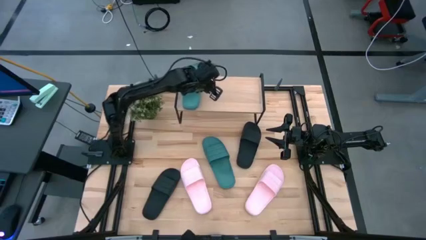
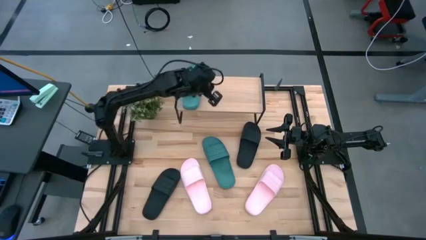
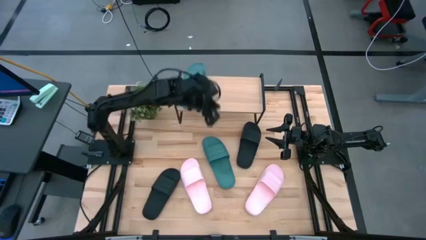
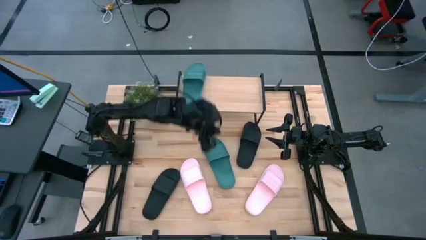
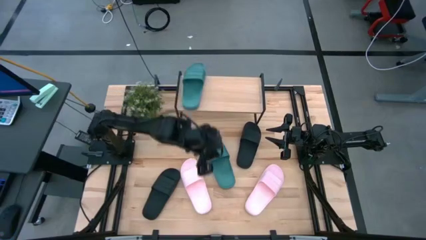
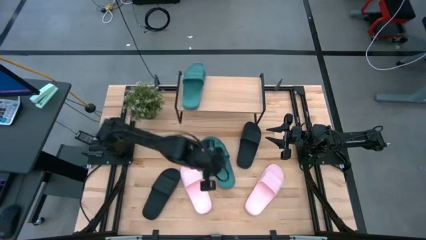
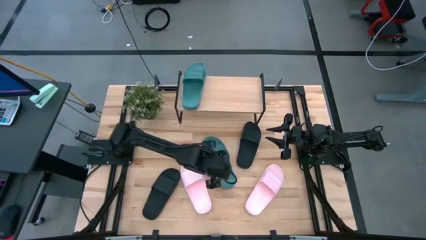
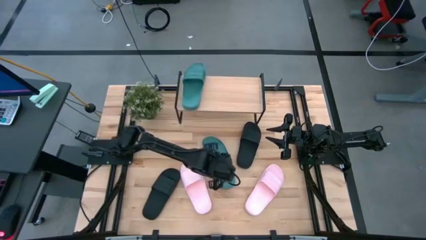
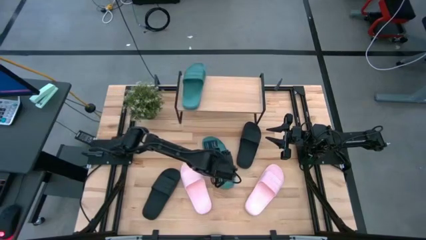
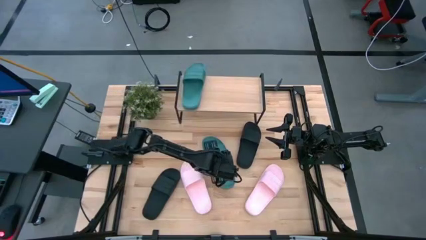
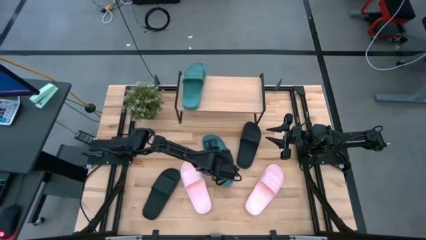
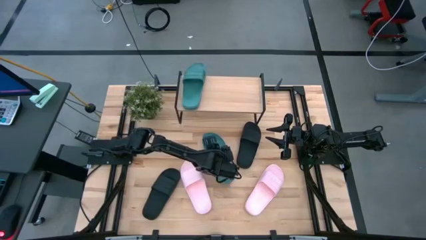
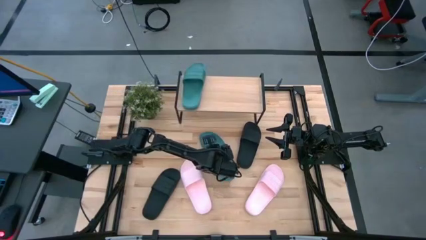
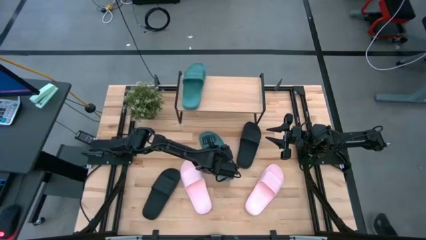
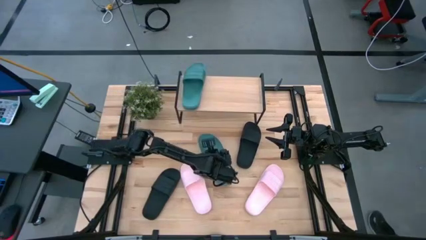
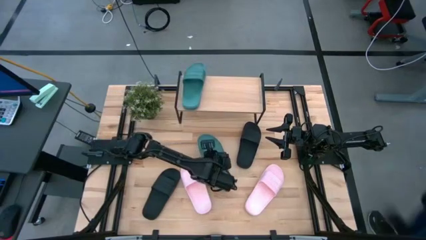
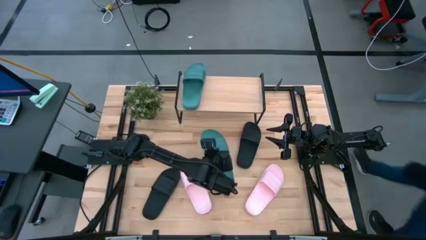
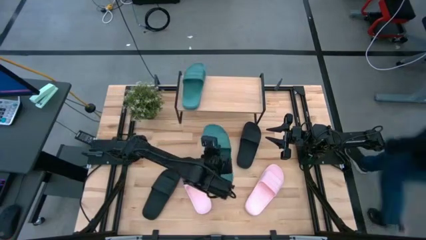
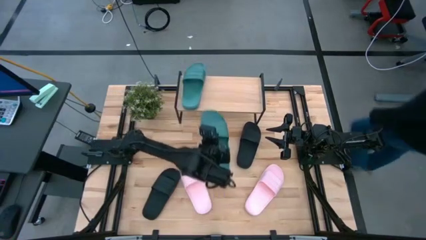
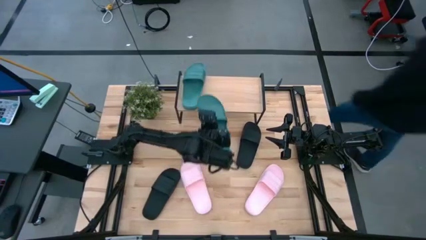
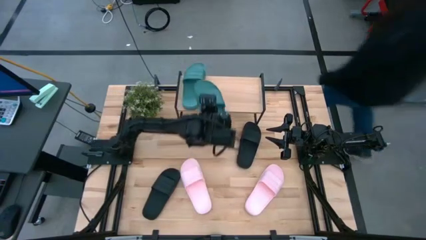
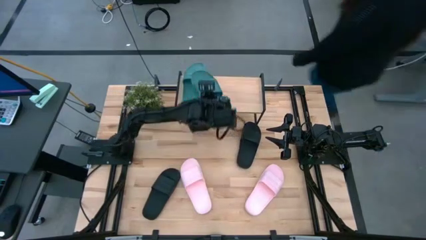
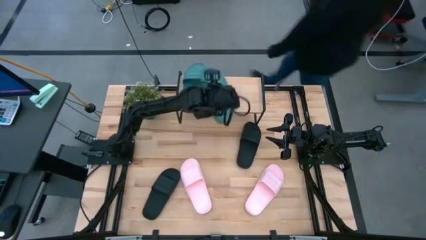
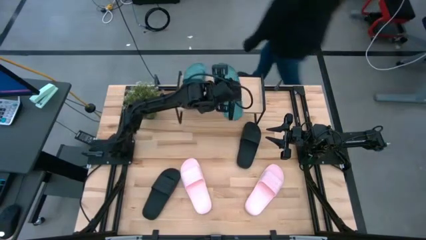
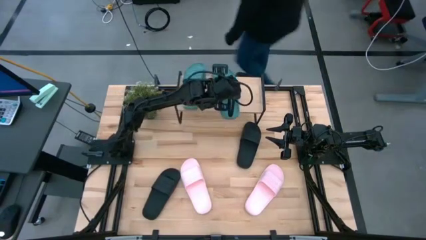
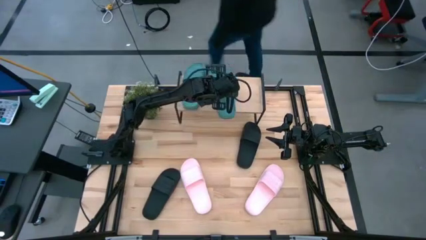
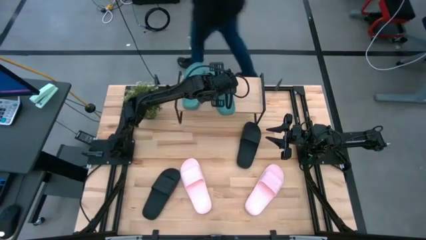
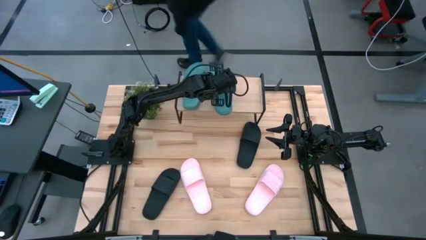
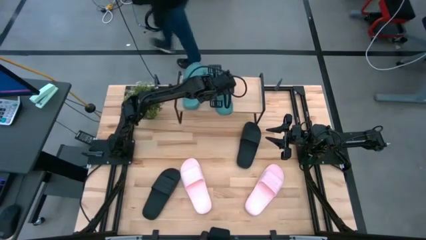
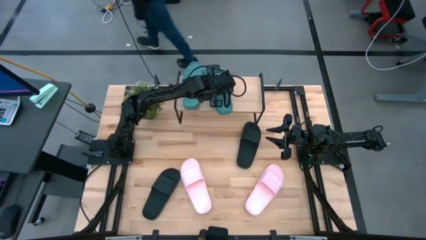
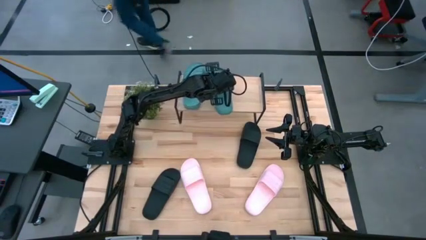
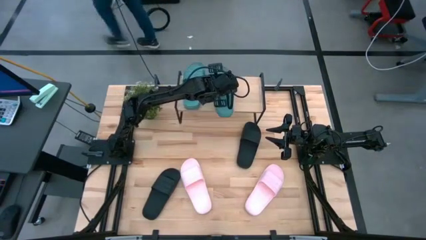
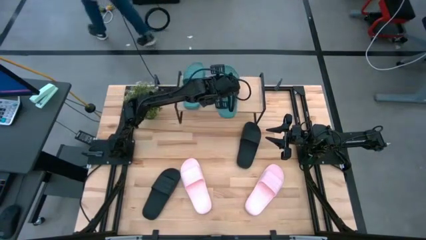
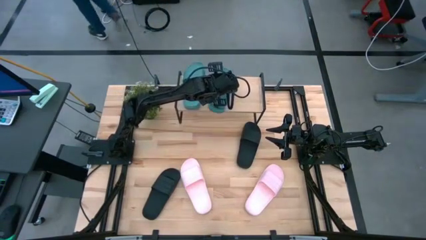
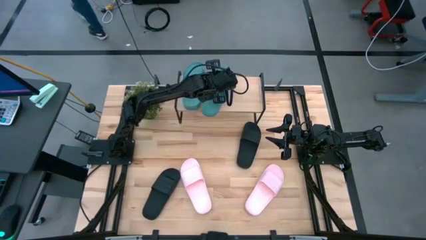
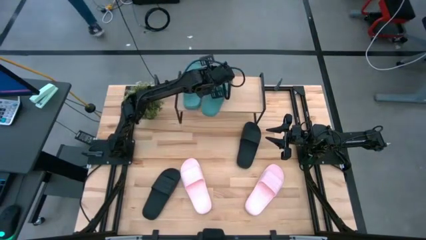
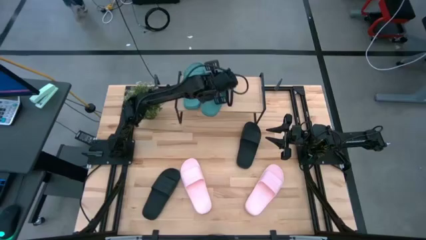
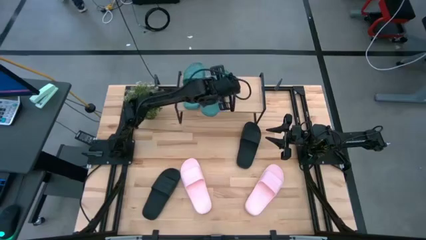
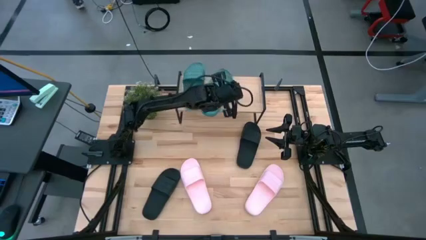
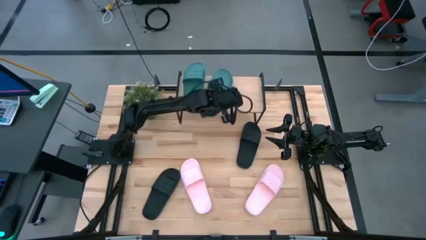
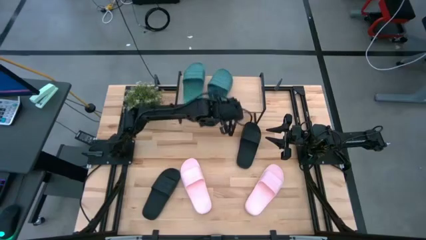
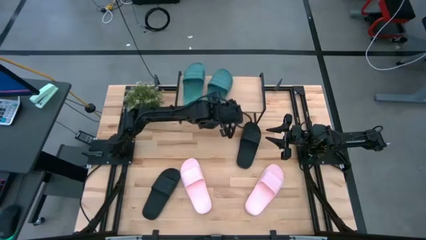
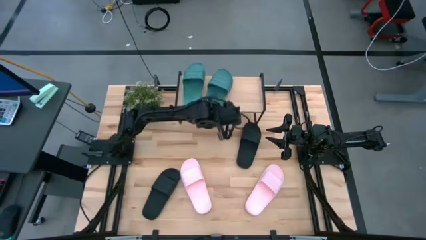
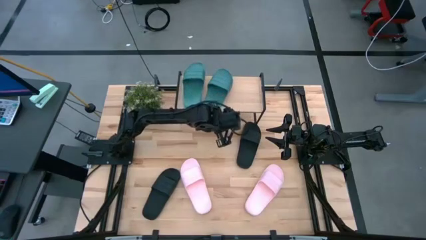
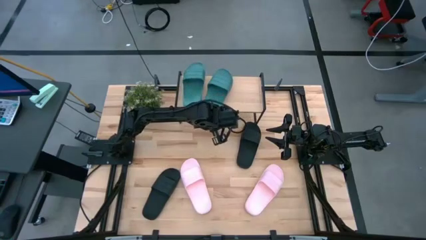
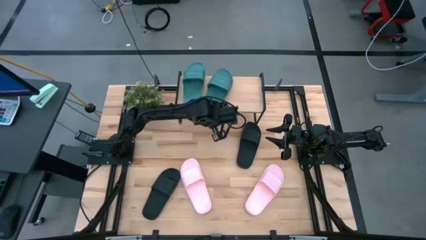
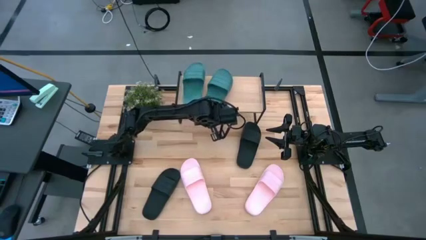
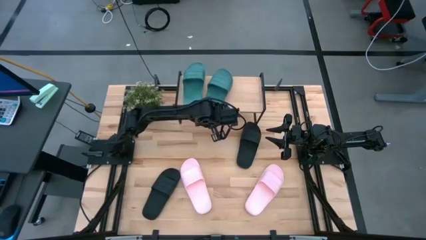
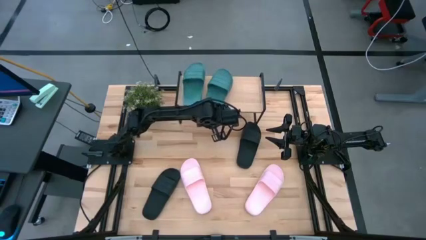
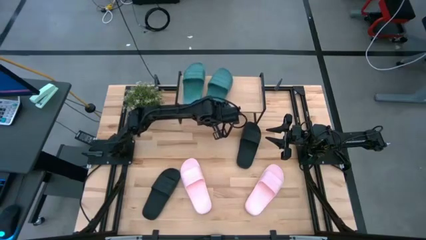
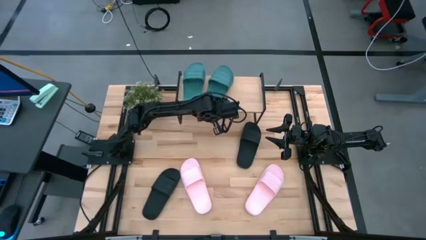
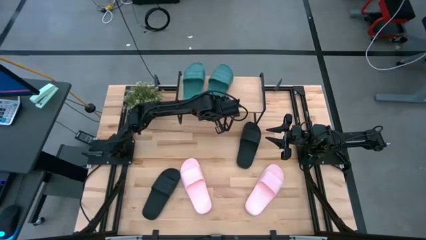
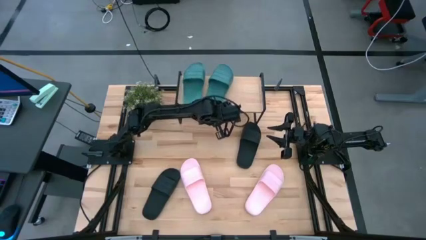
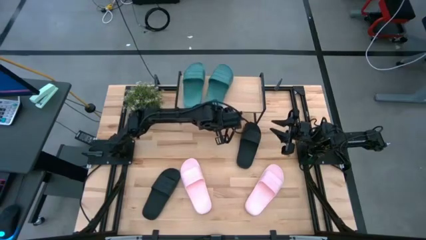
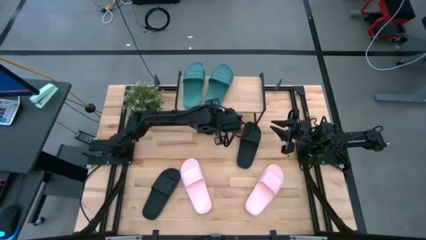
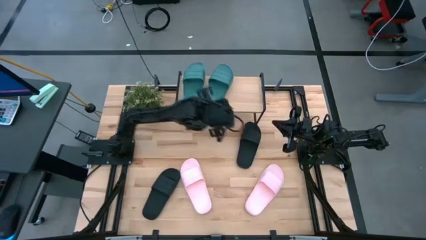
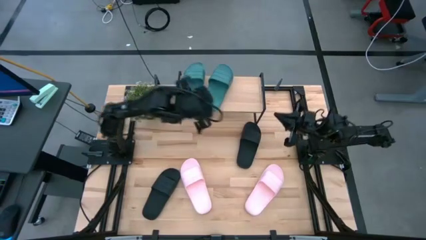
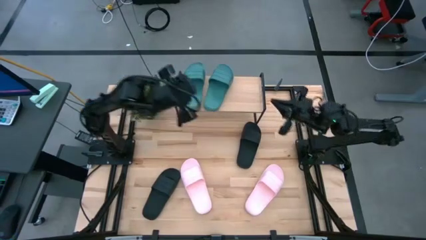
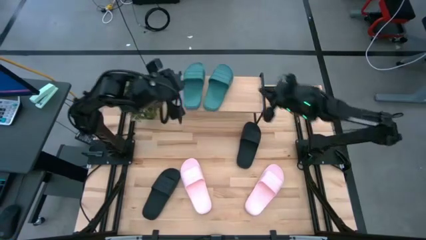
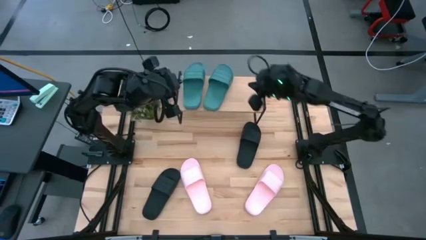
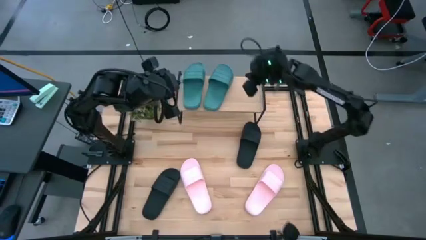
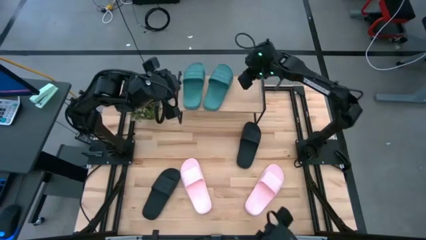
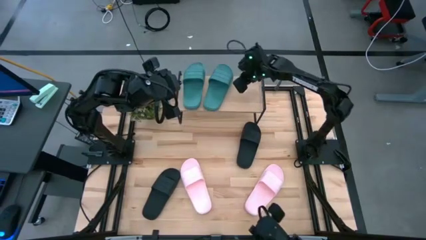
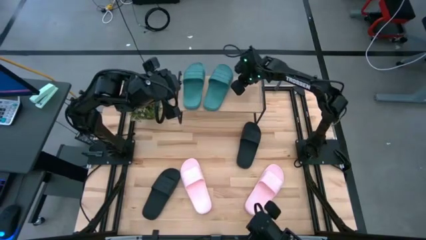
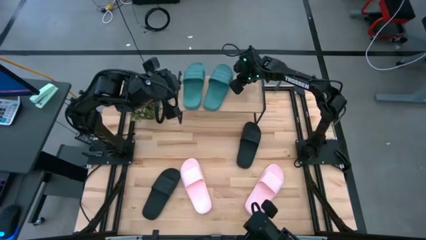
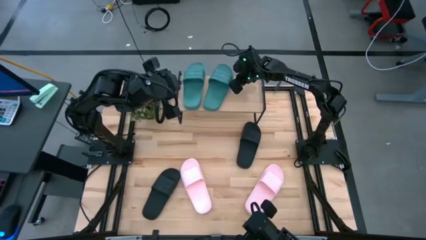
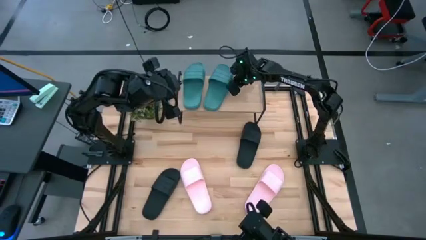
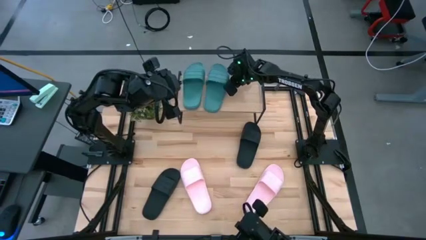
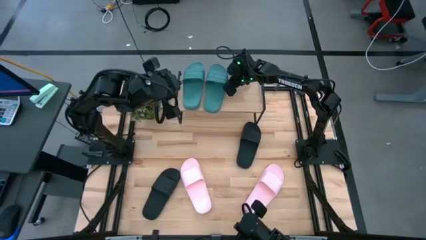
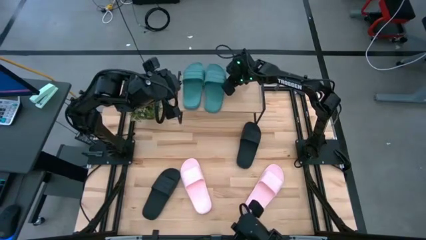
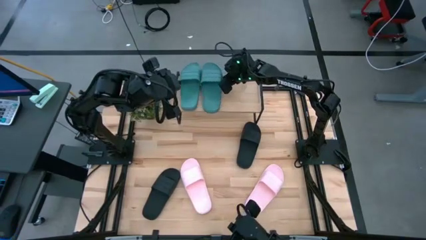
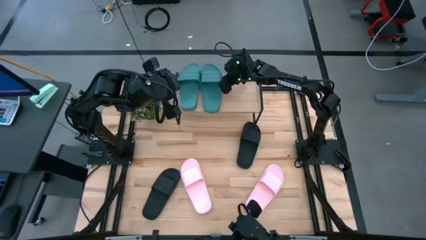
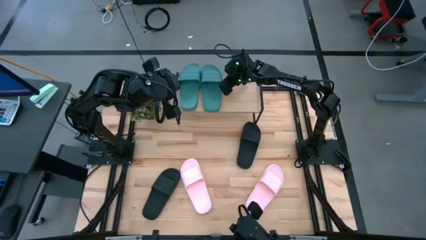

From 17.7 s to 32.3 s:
Task: Pick and place slides into the shelf
Put the green slide on the shelf

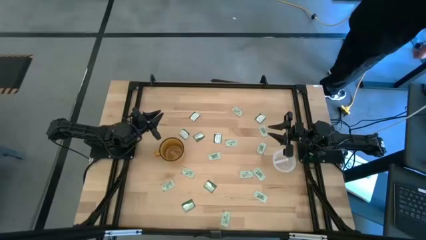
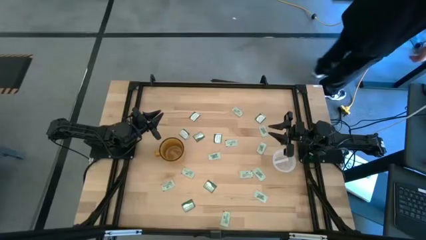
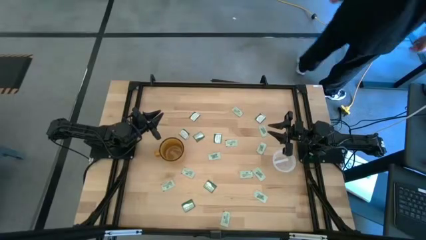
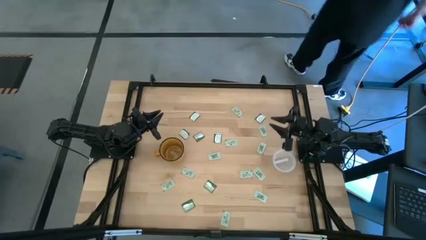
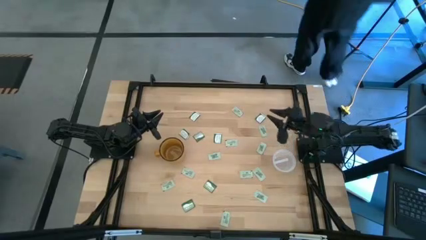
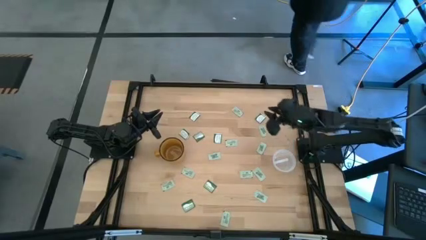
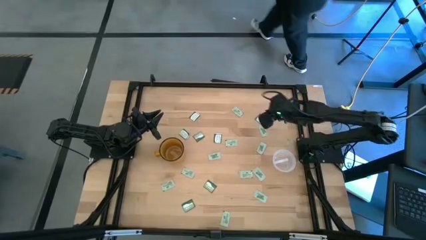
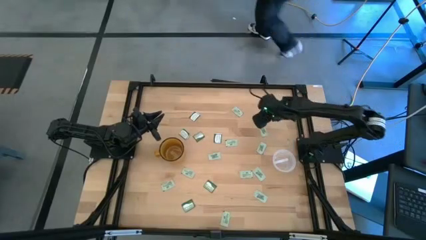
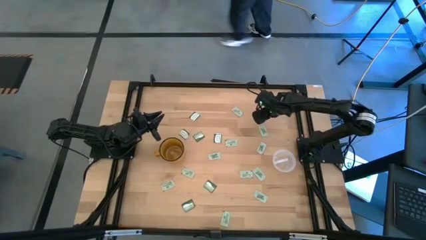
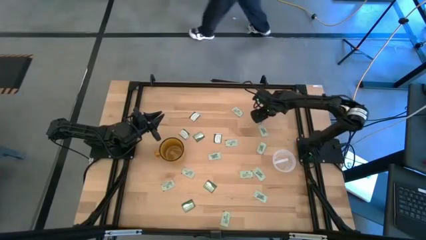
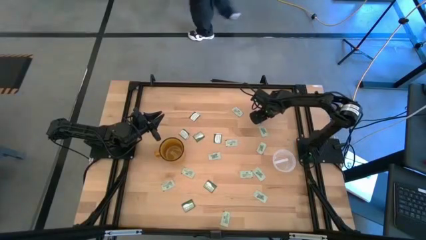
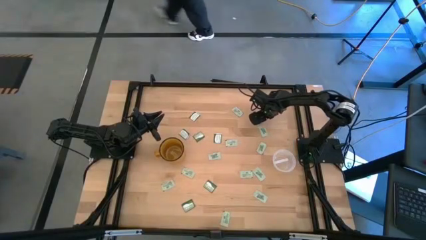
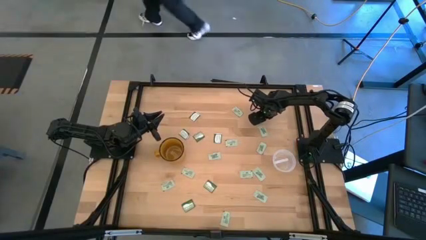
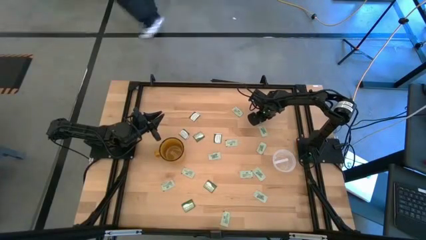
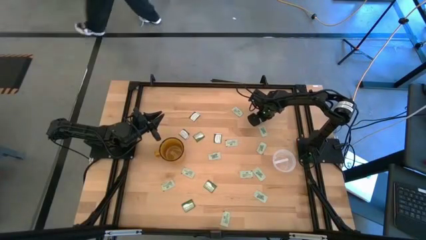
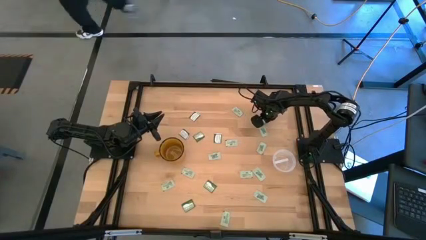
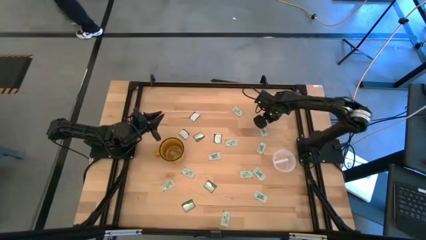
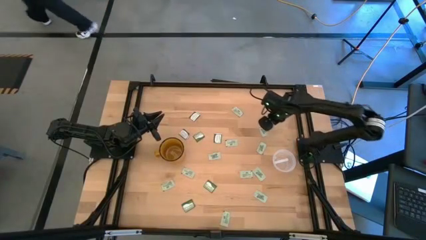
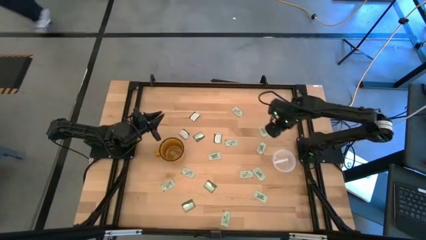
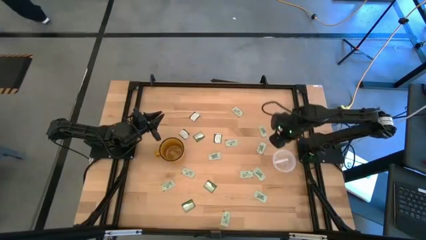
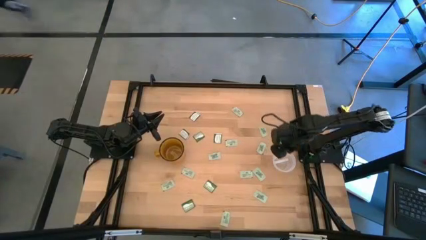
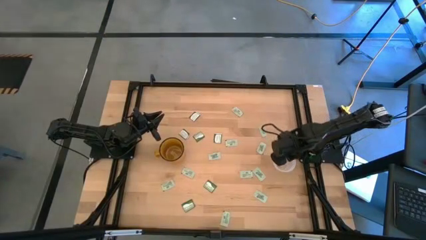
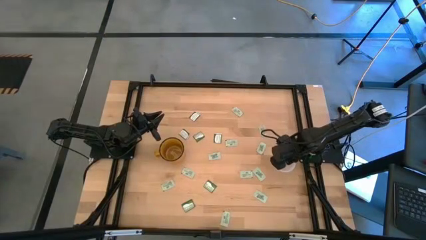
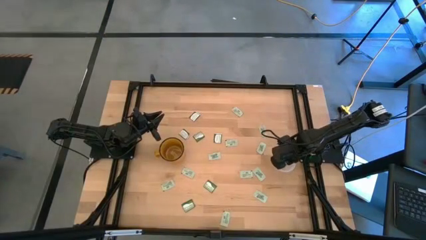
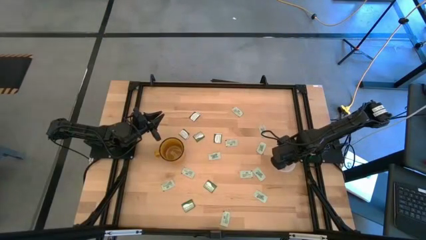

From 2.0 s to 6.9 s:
Task: Pick and place Stevia / Truvia into bins
Put the green stevia packet into the transparent container
